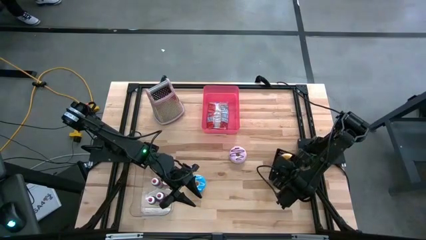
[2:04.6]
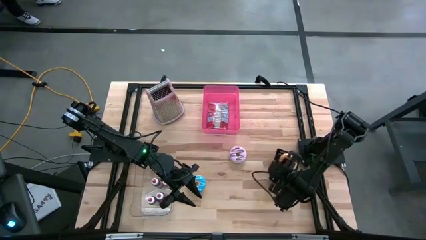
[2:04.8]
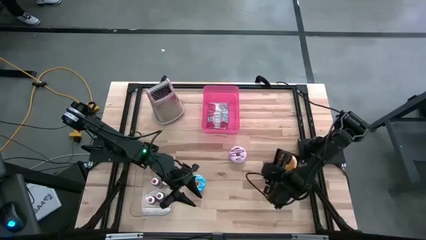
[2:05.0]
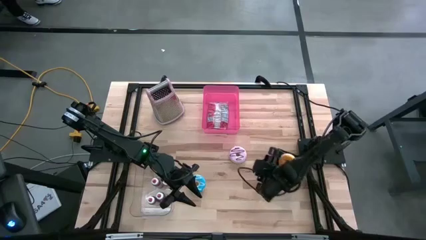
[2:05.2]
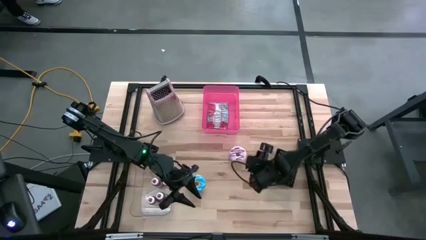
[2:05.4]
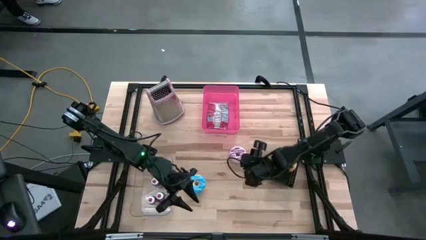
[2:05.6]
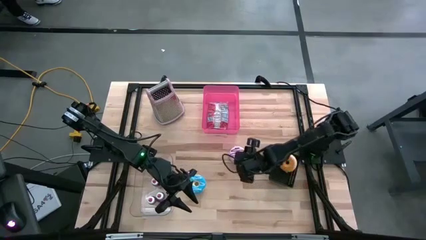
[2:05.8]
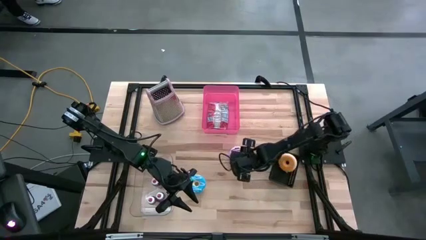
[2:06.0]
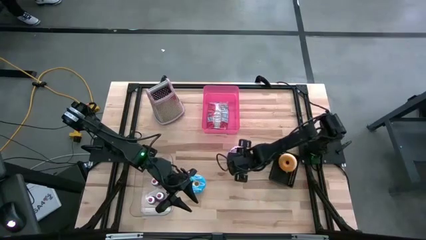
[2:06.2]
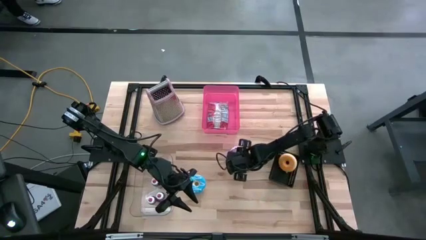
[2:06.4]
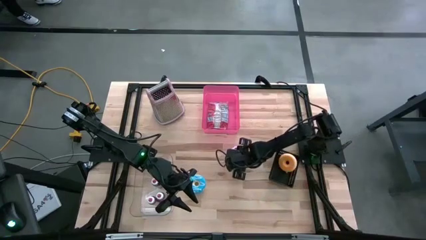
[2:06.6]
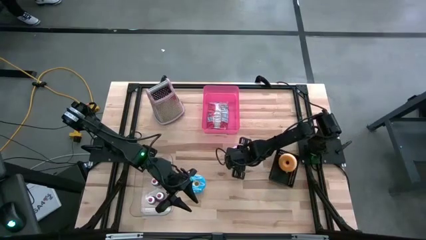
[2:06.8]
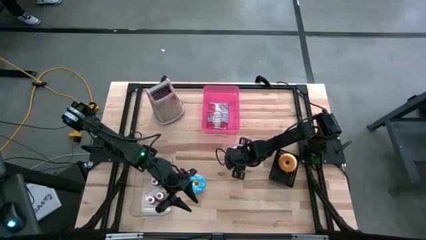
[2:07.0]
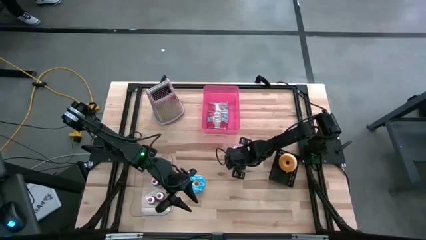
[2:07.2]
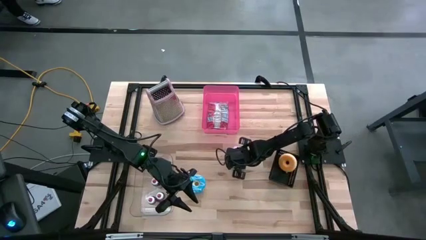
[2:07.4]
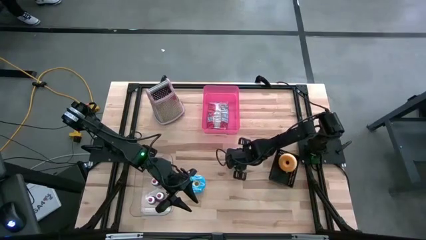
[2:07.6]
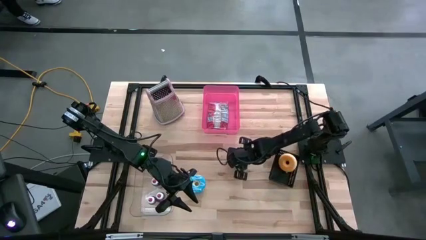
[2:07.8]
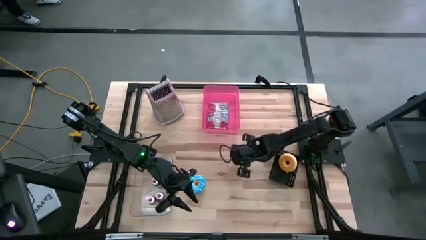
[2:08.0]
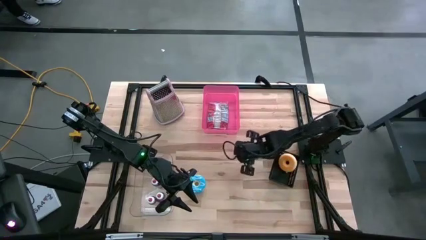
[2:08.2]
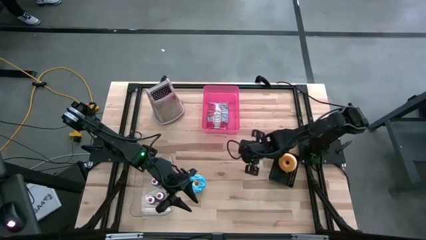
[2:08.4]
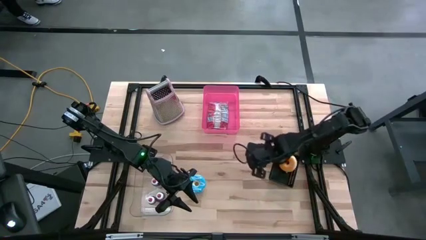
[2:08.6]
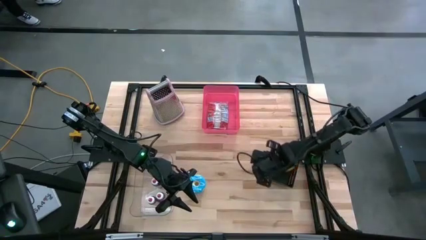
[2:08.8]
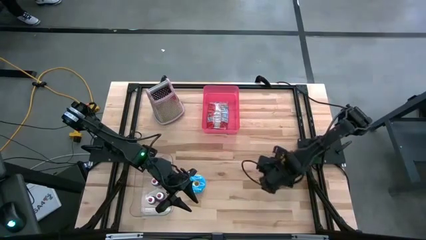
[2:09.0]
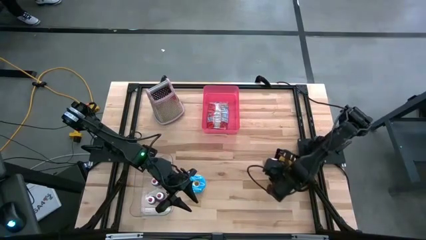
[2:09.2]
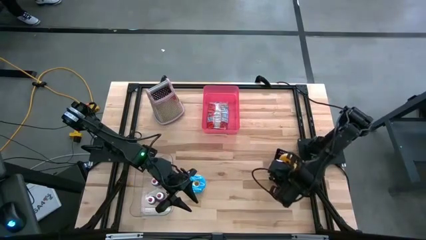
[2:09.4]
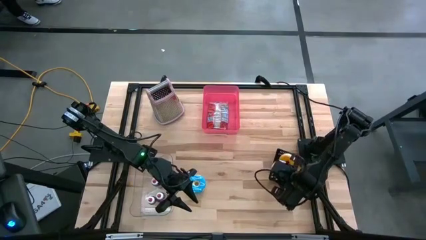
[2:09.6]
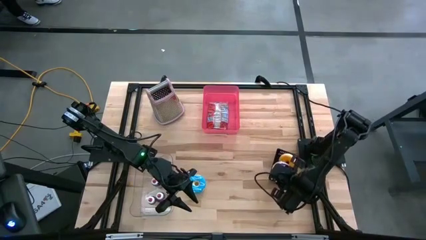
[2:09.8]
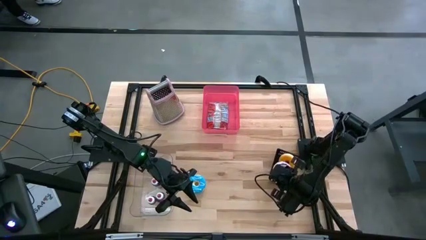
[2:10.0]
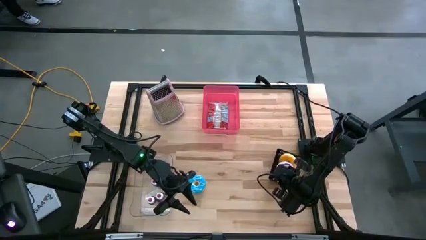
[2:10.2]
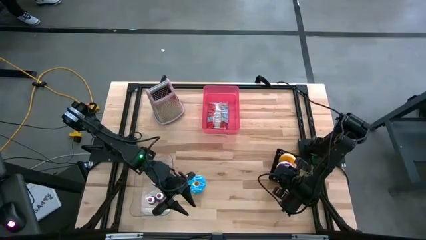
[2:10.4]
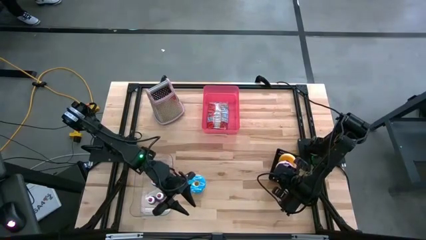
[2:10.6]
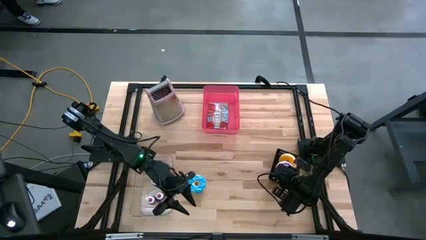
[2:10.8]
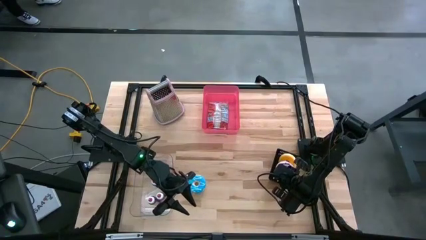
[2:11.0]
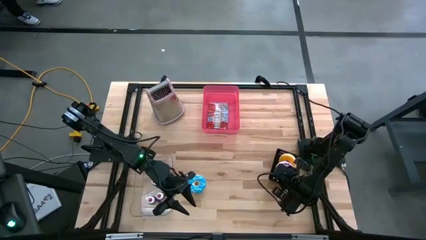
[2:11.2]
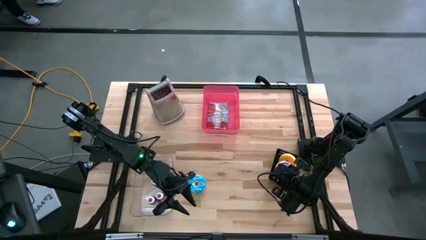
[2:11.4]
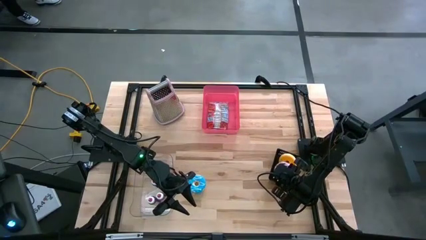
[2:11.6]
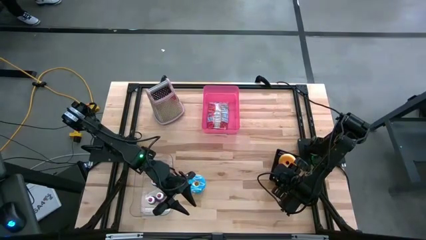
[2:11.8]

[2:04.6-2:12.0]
Put the light violet donut into the black bin

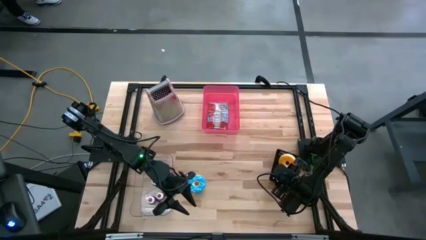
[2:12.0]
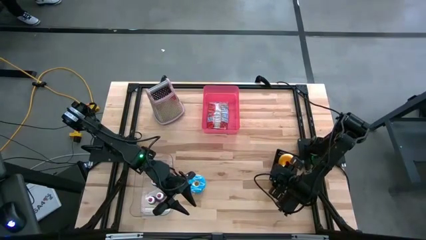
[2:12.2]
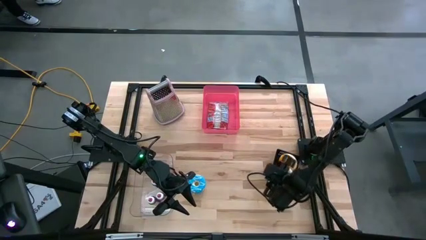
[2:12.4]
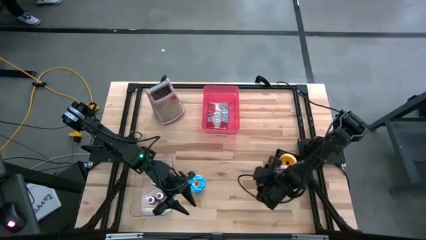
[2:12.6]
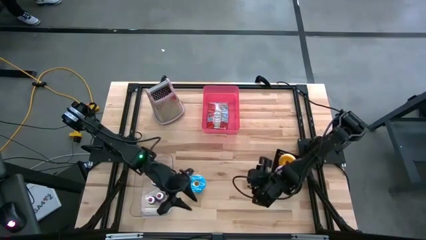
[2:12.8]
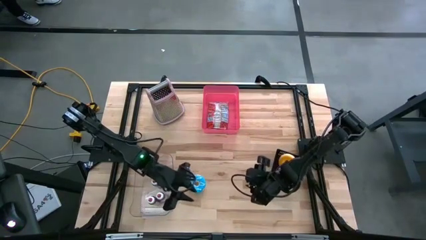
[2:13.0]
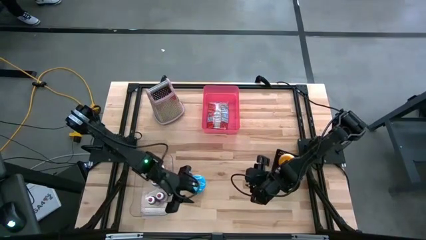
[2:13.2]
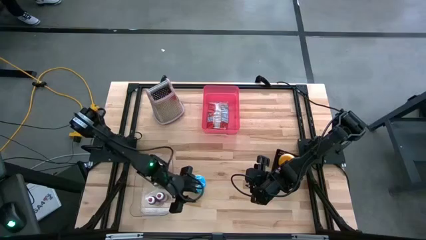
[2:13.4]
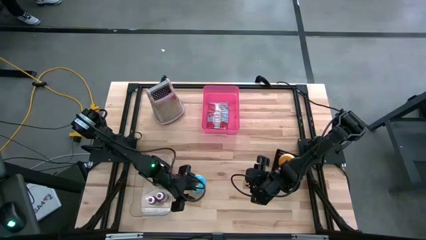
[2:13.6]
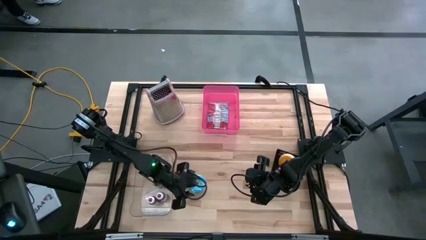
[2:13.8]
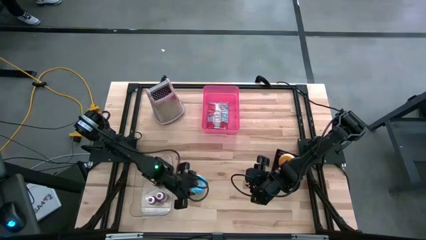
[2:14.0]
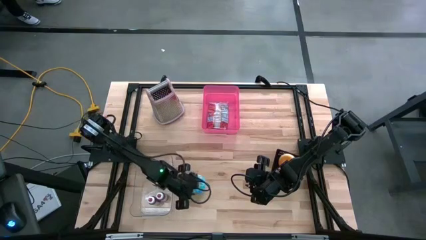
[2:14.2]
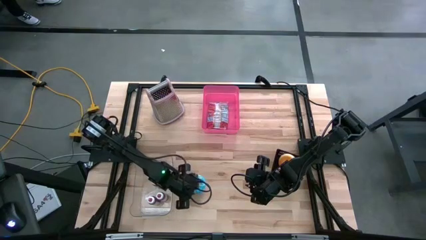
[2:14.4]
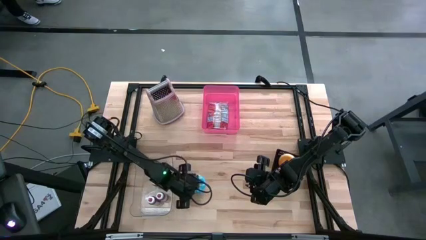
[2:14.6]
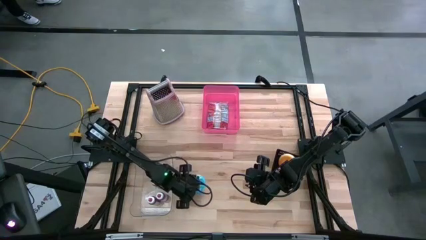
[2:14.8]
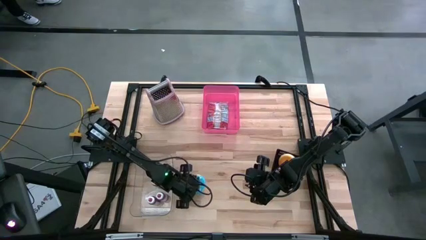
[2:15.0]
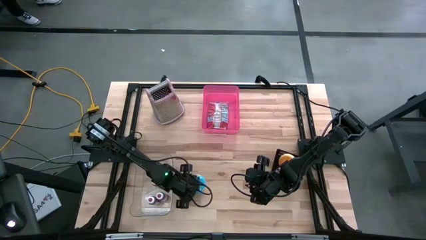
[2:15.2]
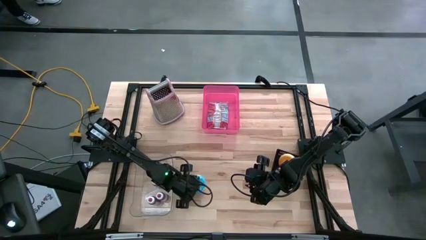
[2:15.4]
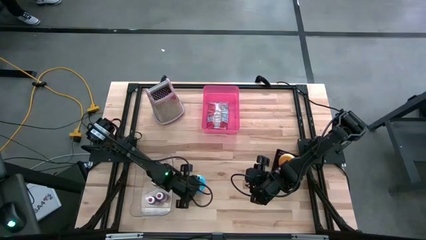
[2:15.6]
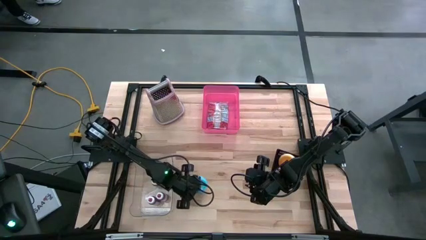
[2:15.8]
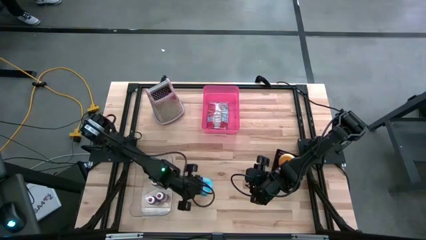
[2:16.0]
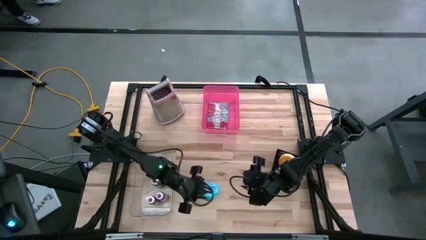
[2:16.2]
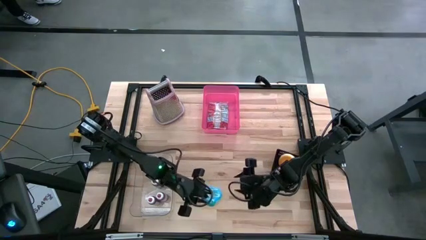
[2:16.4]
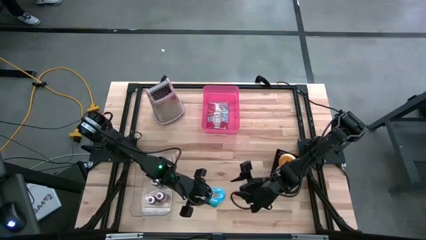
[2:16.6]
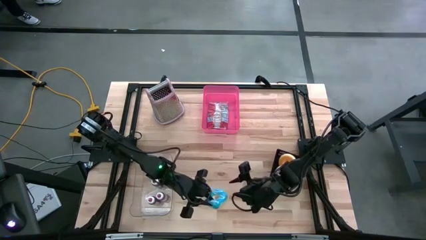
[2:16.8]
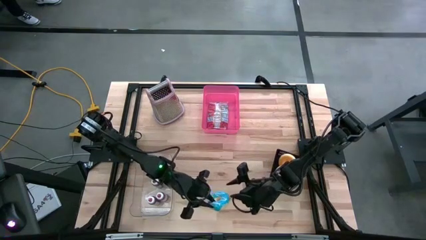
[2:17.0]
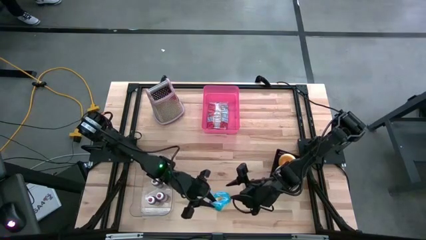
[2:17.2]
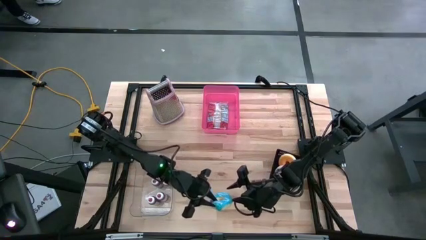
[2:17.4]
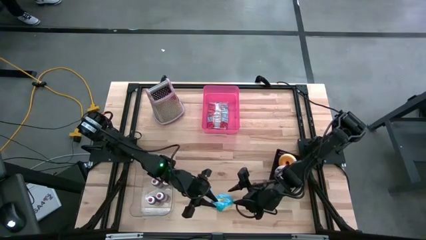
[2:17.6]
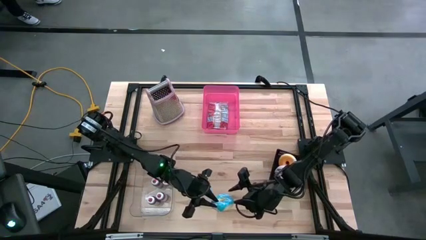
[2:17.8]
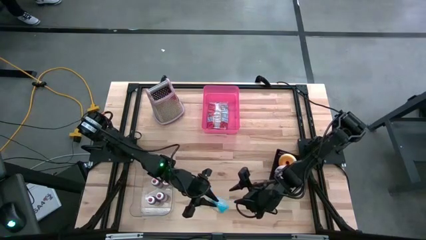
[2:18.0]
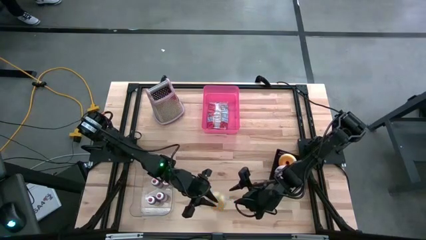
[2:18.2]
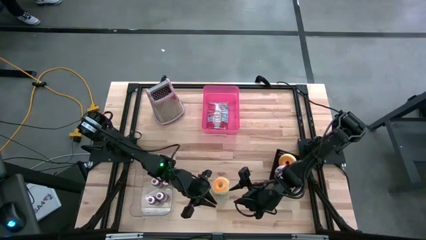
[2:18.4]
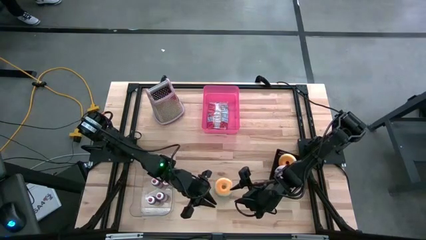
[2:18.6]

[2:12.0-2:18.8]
Put the light blue donut into the black bin

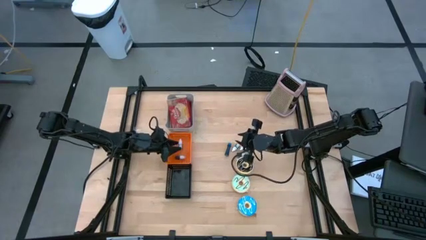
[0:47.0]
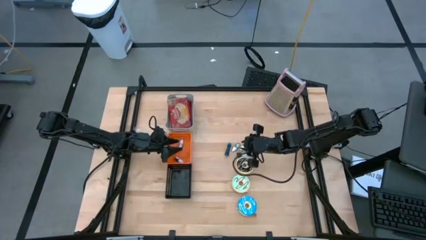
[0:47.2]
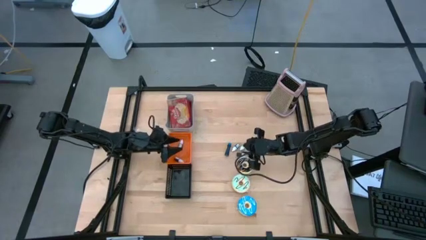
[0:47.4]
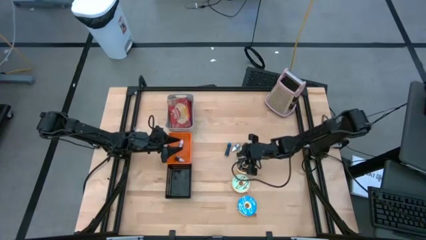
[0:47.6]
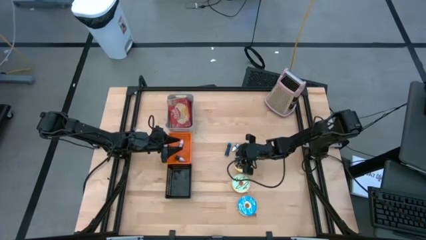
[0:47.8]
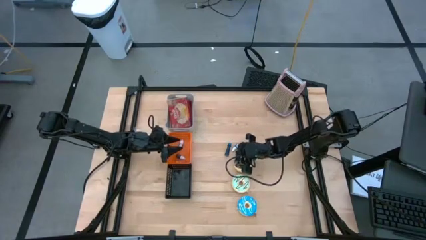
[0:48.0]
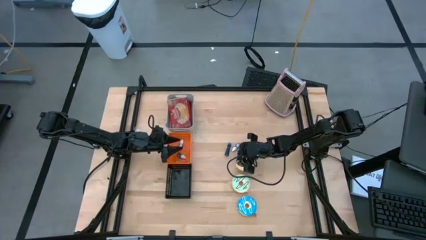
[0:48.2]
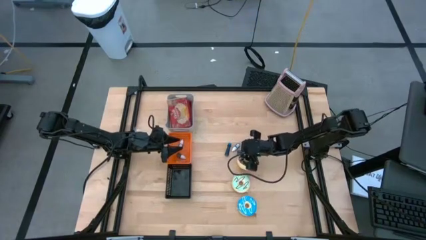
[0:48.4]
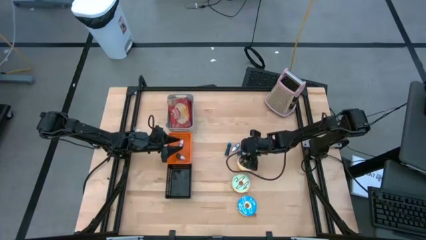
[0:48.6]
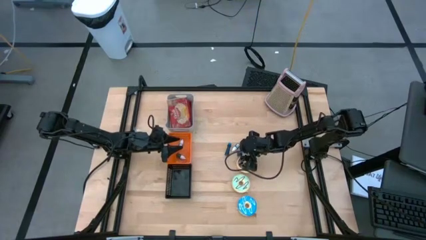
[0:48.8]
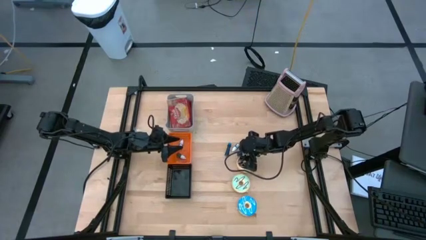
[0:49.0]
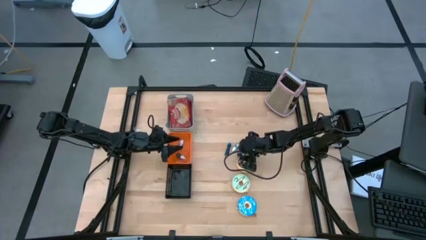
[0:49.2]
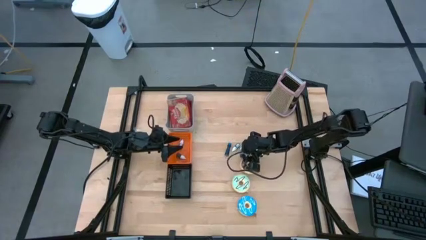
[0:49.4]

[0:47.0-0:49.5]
Put the purple food coloring bottle into the orange bin
